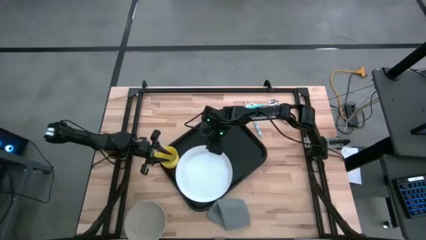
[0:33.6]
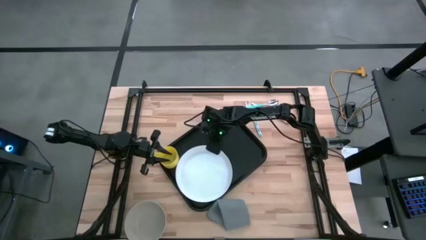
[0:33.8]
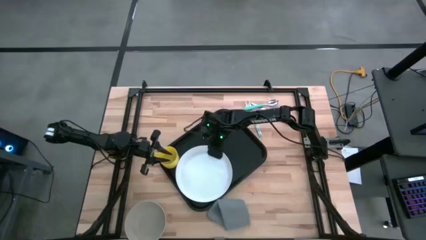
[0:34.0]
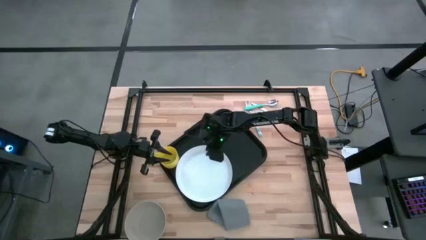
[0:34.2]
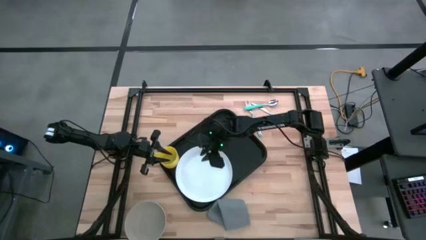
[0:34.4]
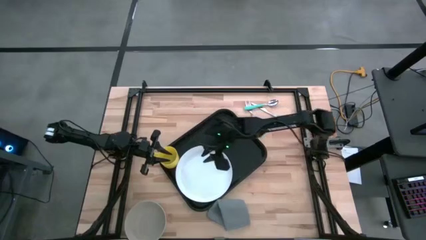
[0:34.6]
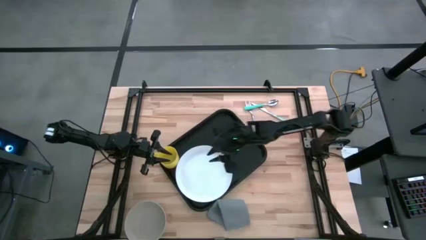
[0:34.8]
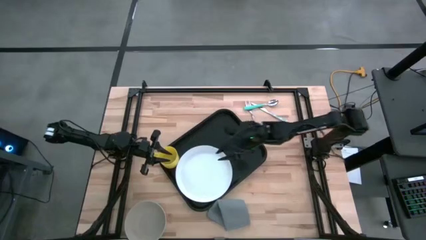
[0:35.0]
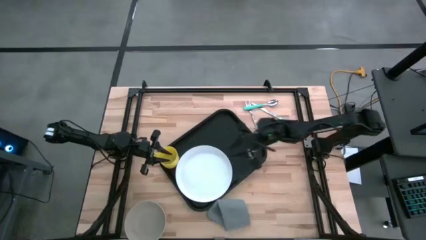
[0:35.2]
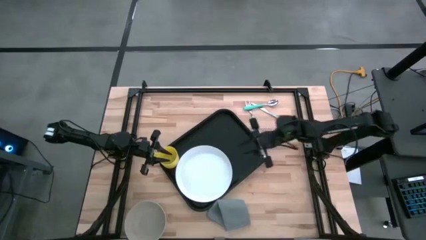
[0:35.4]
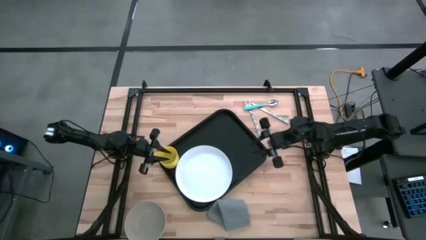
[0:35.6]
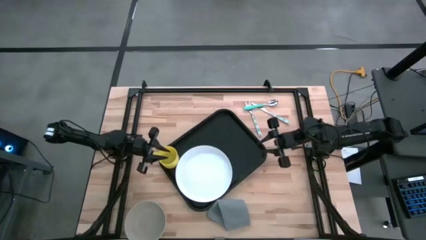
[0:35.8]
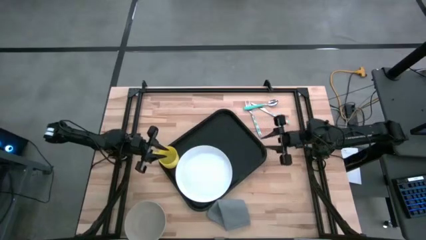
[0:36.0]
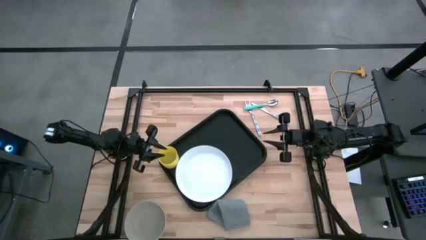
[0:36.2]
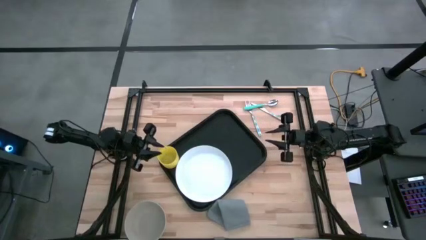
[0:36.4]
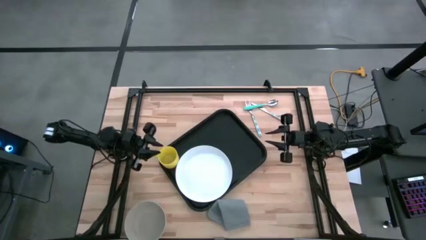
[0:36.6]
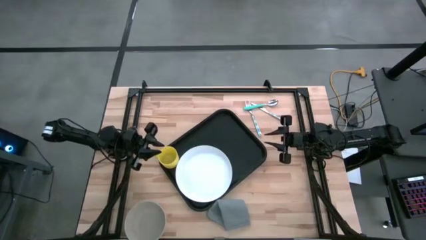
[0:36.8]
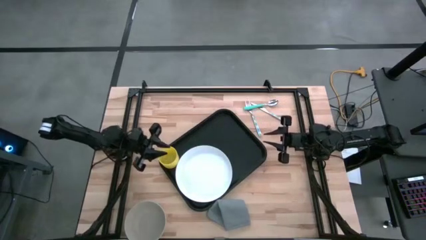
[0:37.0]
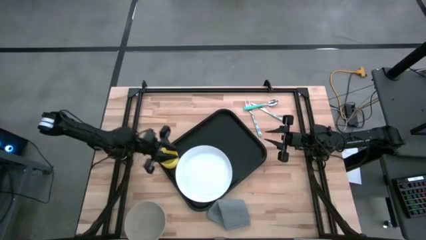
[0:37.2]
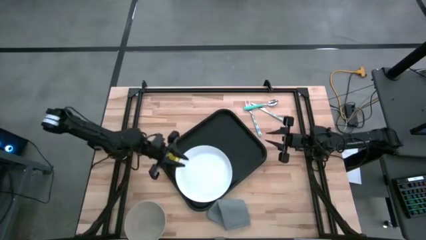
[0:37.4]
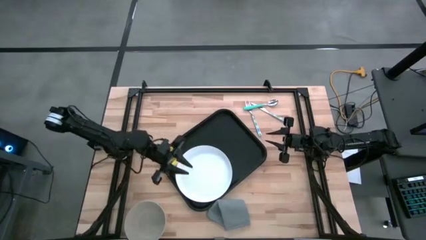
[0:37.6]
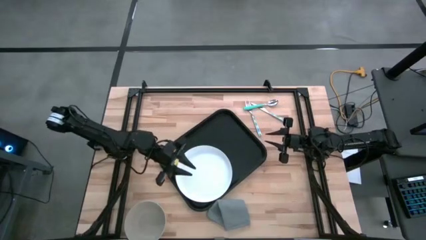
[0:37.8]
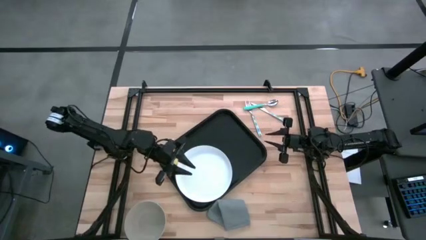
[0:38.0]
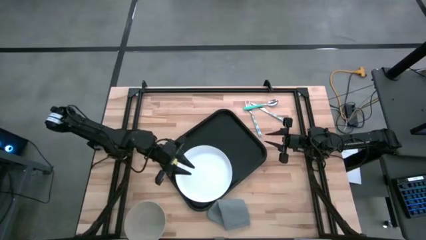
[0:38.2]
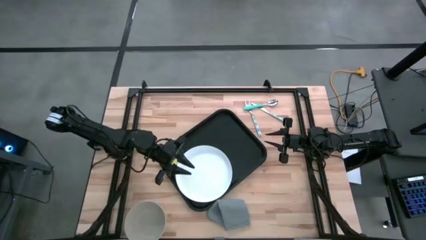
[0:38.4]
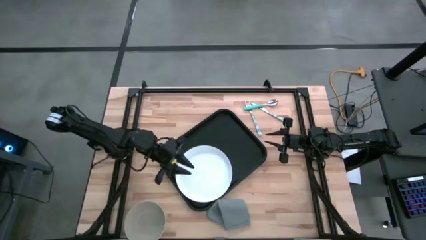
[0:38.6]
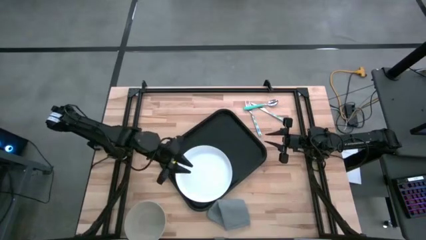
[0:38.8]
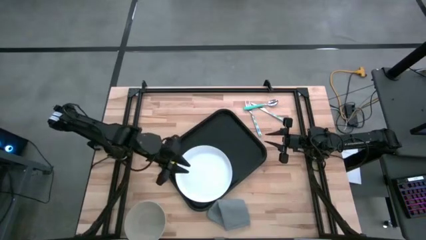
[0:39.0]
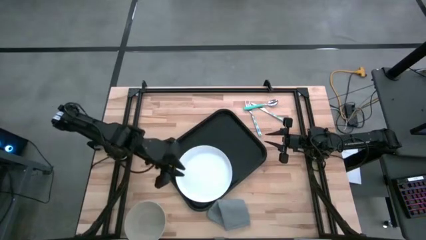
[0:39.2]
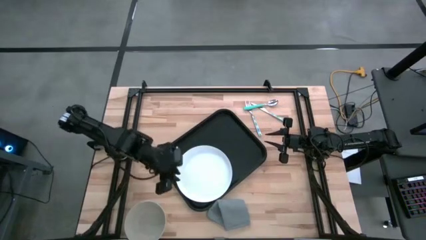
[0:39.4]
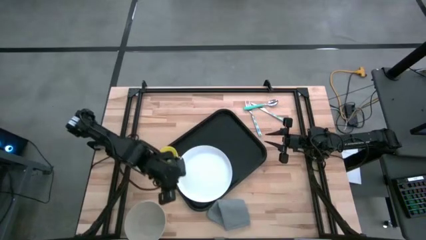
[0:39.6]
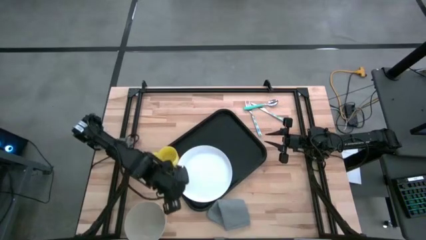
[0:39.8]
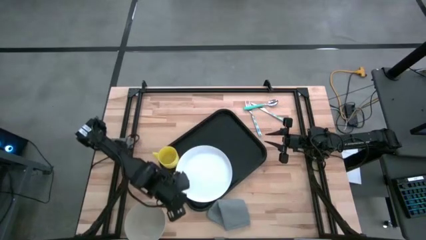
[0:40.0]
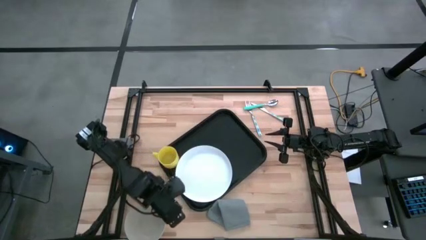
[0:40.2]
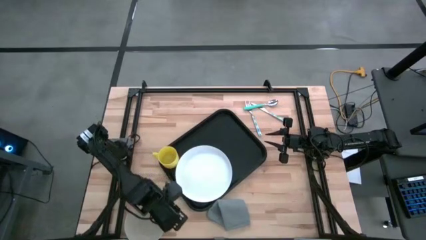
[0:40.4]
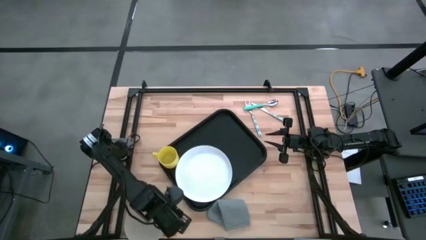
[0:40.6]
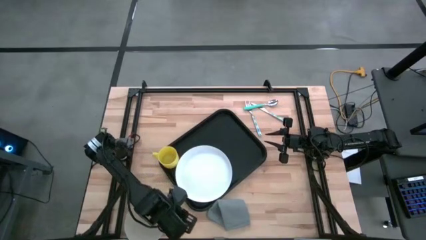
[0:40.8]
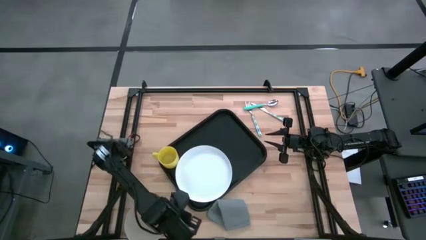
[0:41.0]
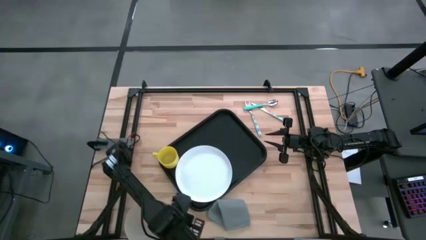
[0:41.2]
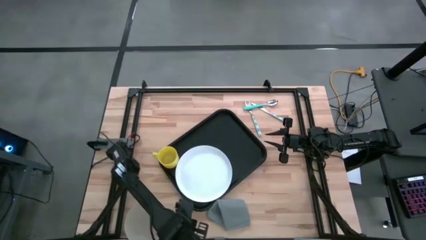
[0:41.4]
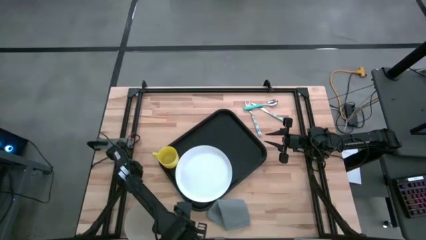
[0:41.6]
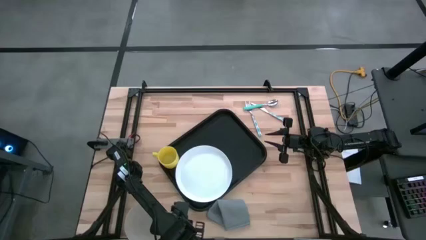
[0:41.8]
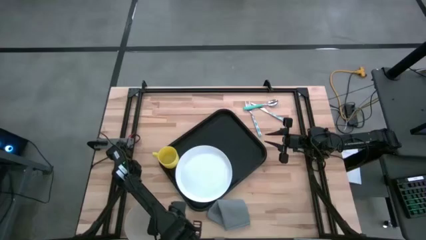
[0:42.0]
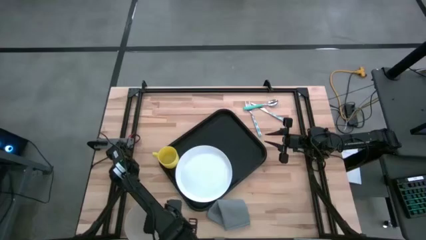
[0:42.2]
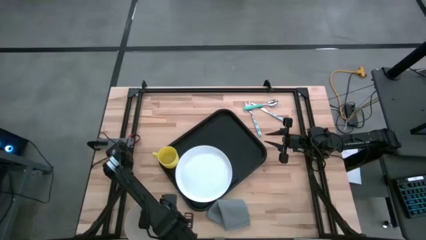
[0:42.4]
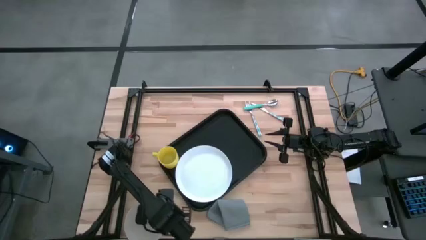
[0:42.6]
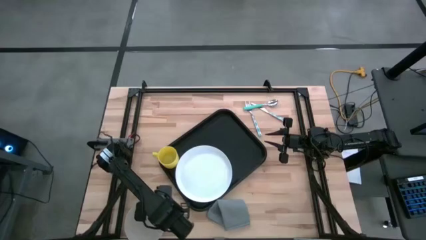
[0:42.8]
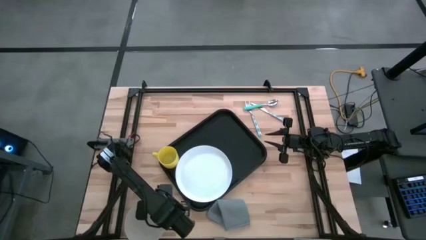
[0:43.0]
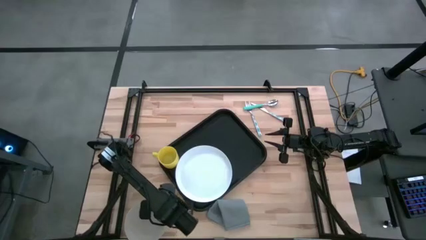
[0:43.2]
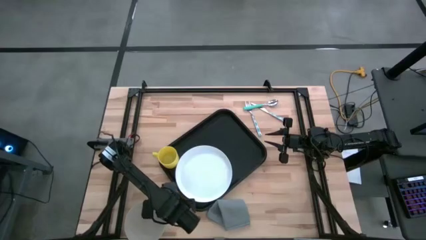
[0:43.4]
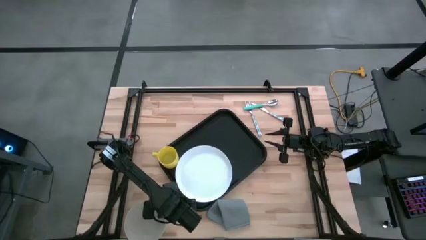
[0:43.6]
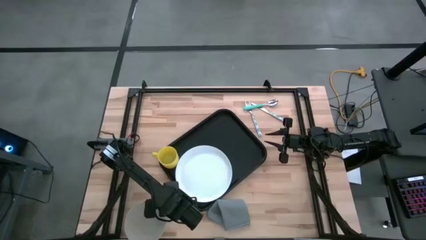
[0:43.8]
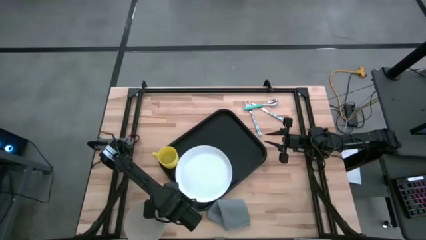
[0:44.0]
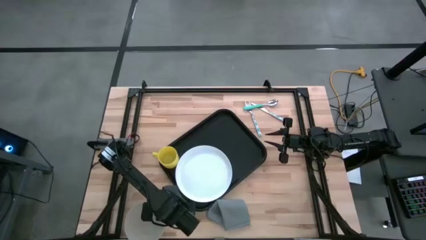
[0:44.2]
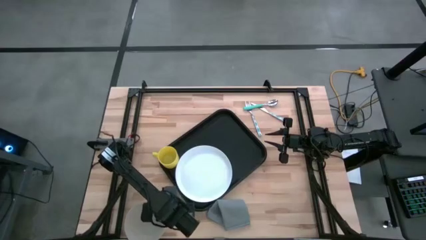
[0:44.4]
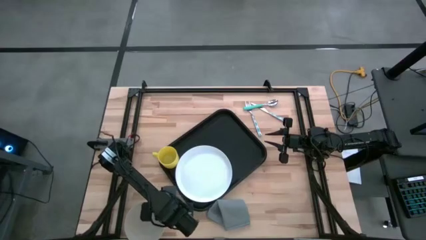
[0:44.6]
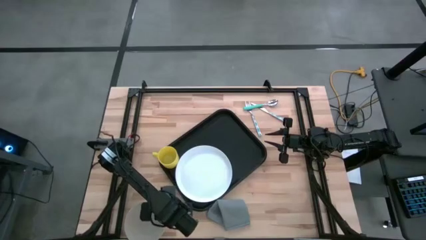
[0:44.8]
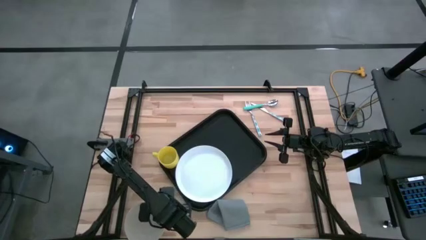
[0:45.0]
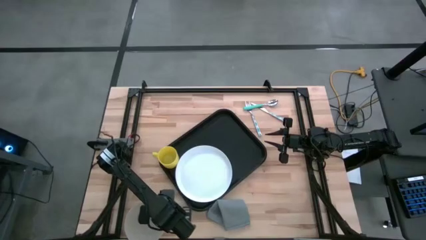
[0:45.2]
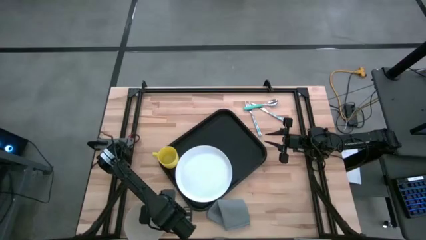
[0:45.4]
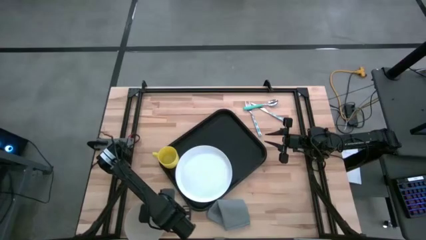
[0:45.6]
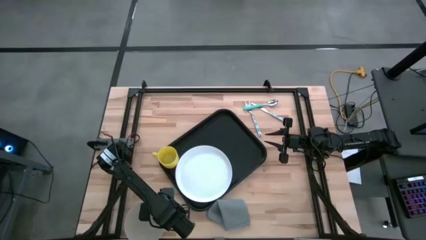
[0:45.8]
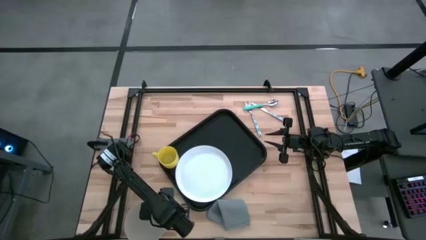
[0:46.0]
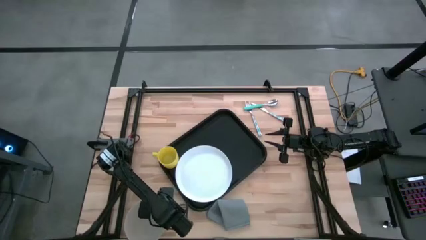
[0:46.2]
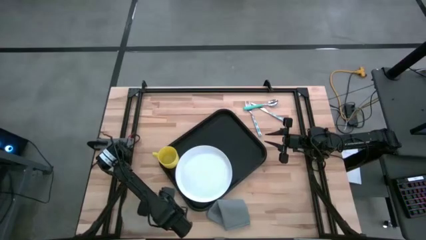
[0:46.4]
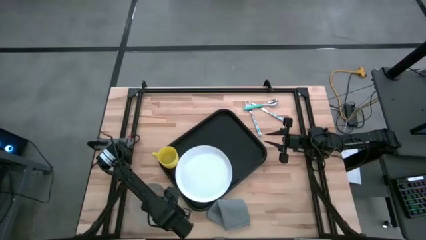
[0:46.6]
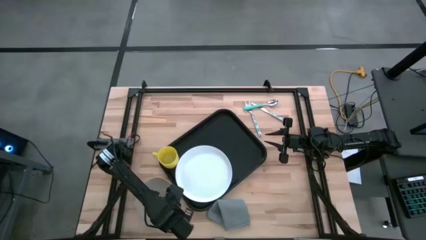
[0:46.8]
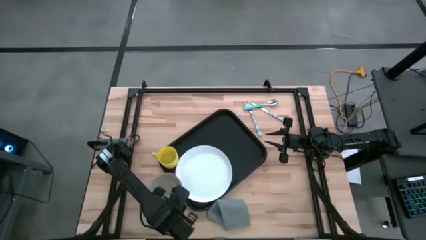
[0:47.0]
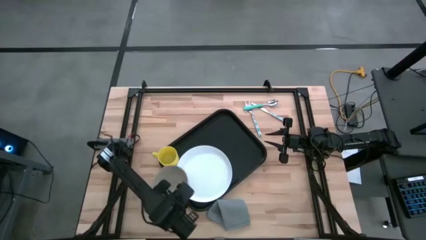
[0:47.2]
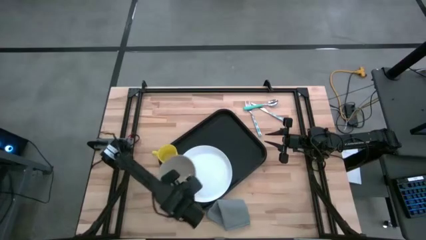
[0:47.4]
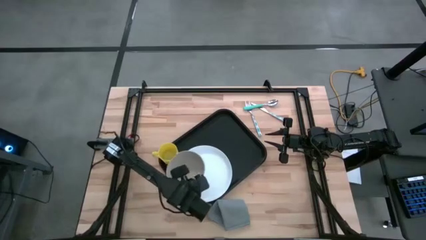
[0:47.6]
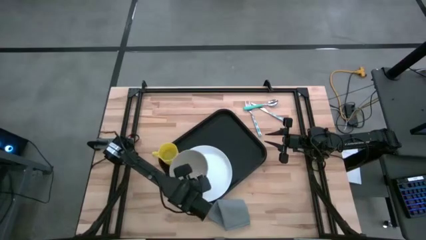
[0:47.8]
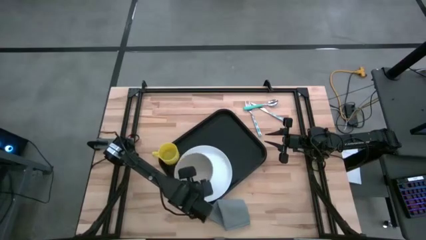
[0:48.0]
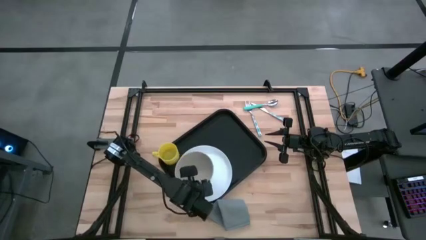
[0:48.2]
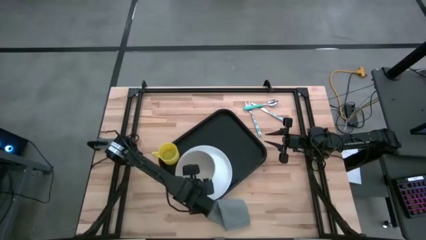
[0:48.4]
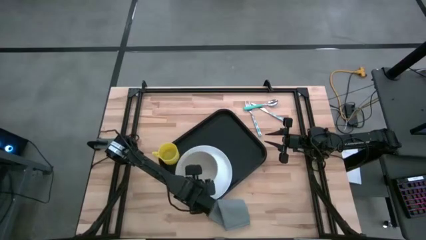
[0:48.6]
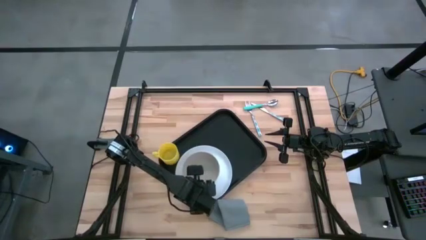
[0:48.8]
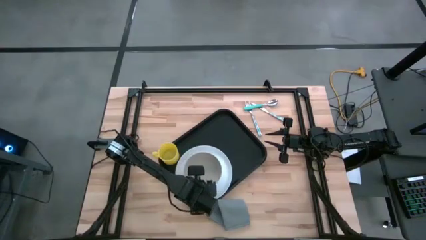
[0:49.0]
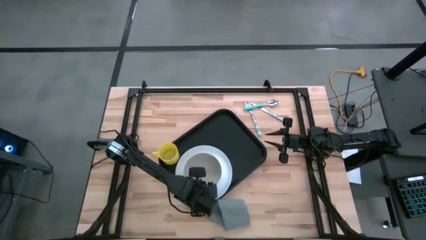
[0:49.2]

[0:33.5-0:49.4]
Task: Set up tray
Put the gray bowl on top of the white plate on the black tray
